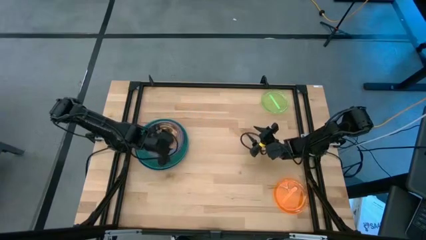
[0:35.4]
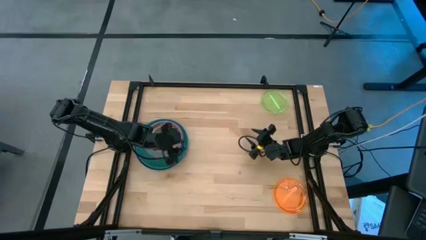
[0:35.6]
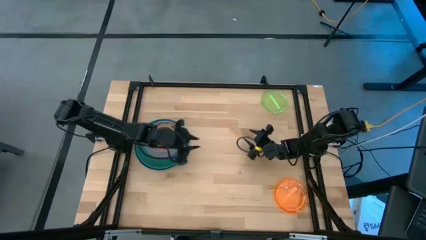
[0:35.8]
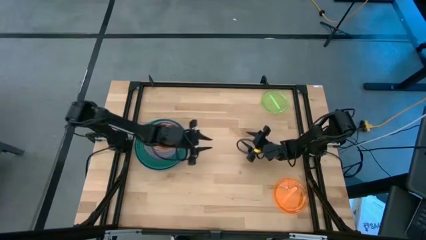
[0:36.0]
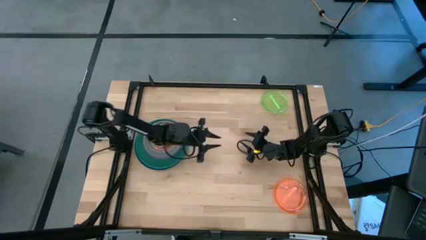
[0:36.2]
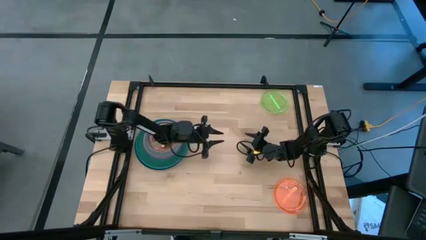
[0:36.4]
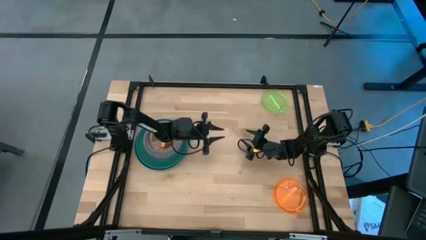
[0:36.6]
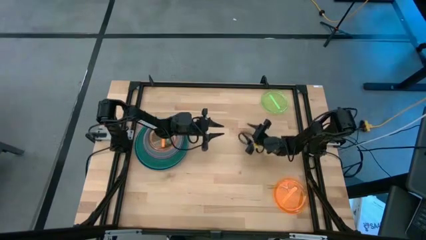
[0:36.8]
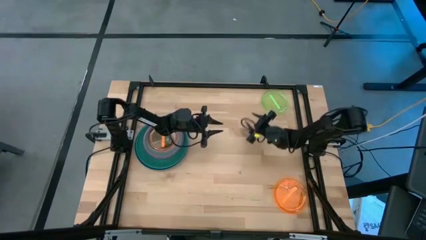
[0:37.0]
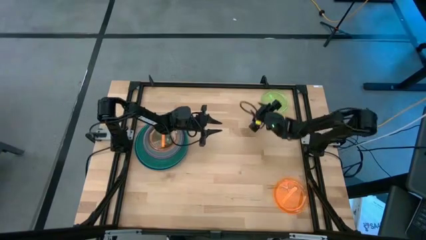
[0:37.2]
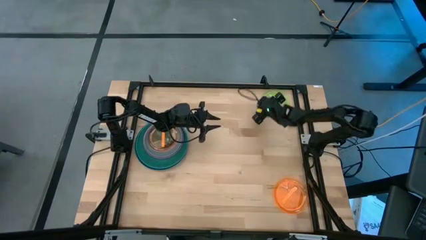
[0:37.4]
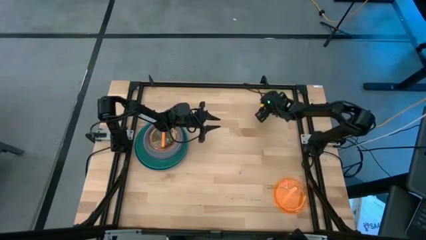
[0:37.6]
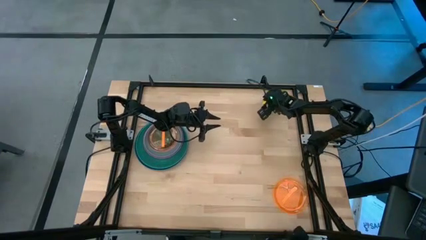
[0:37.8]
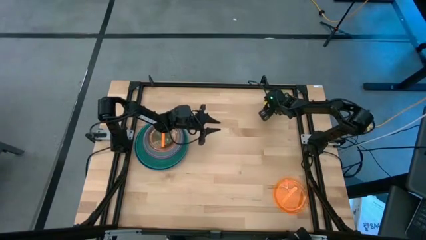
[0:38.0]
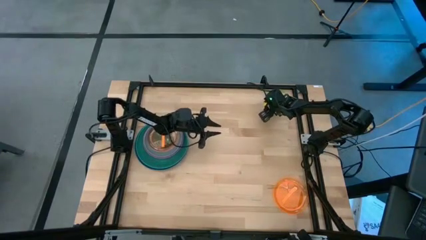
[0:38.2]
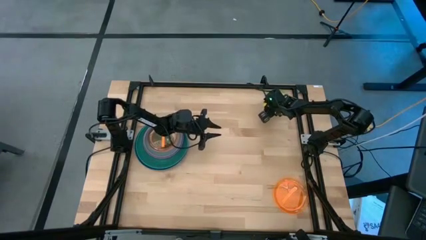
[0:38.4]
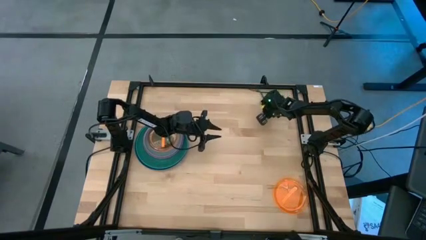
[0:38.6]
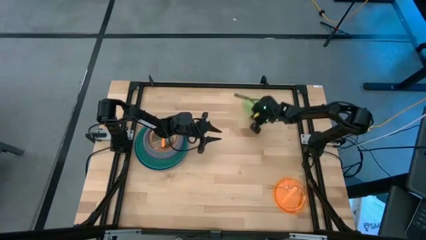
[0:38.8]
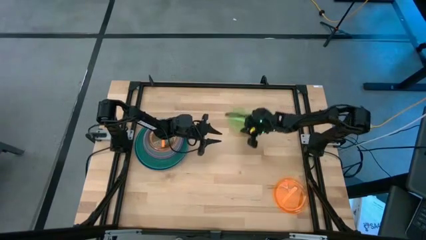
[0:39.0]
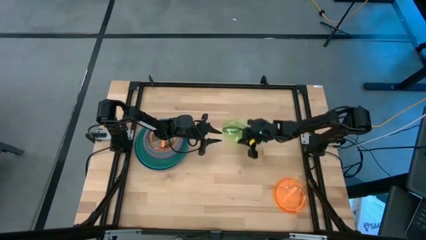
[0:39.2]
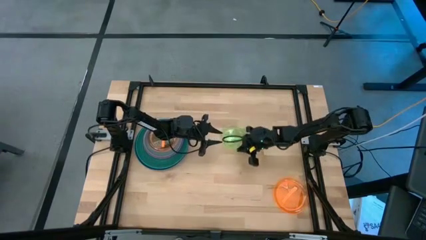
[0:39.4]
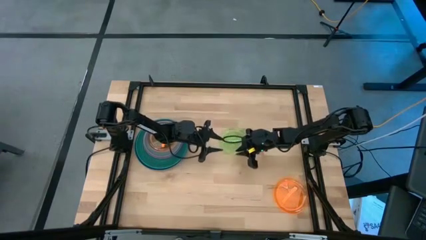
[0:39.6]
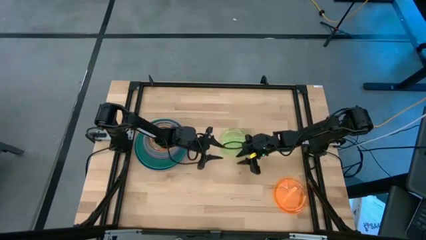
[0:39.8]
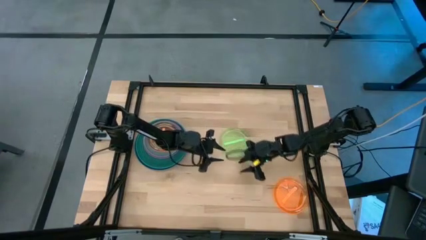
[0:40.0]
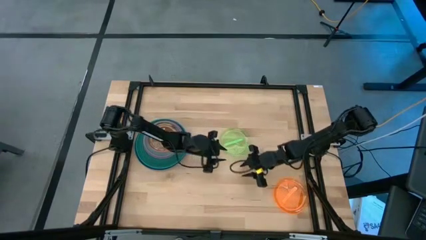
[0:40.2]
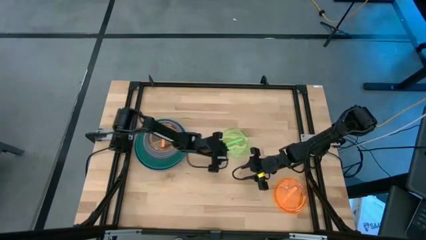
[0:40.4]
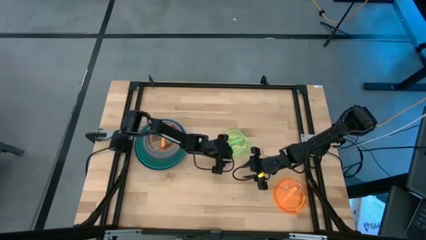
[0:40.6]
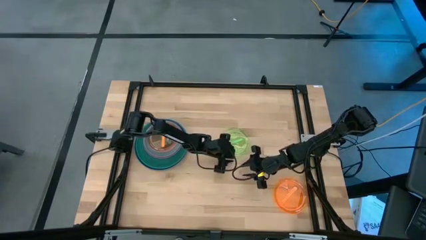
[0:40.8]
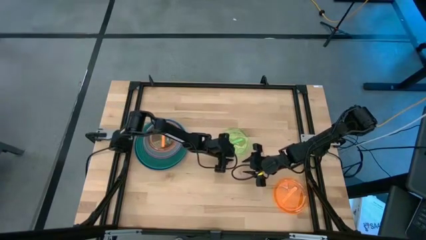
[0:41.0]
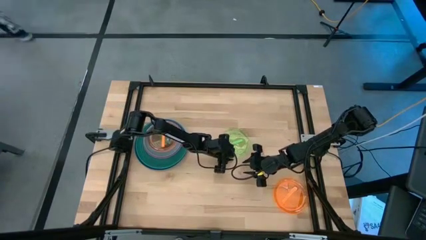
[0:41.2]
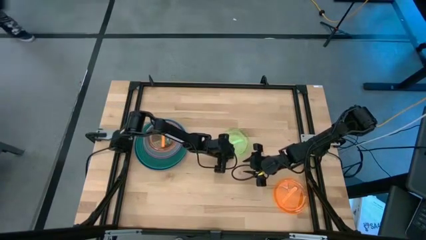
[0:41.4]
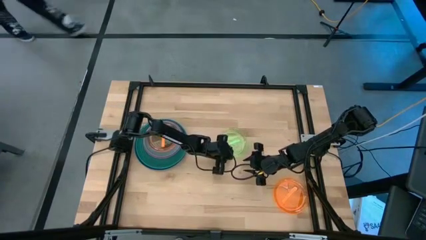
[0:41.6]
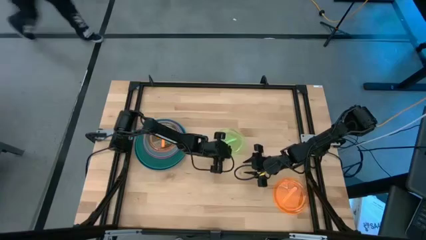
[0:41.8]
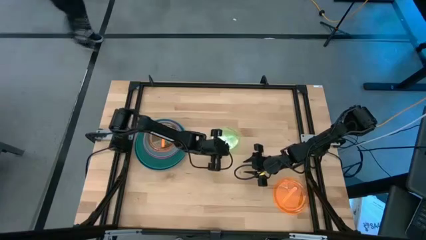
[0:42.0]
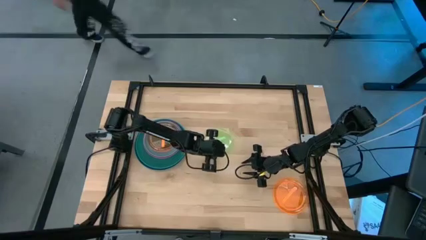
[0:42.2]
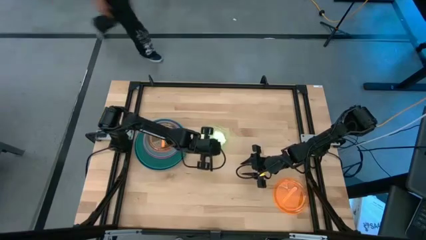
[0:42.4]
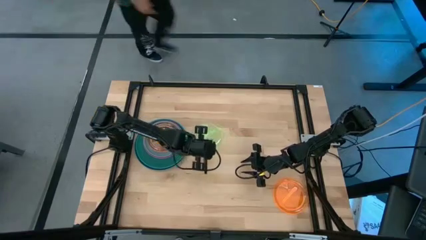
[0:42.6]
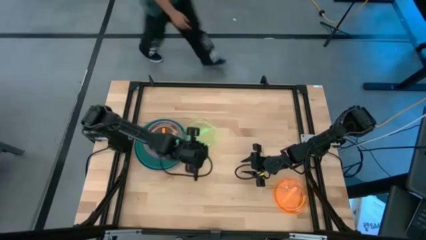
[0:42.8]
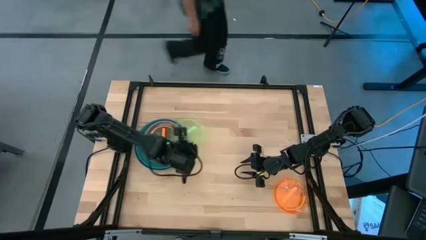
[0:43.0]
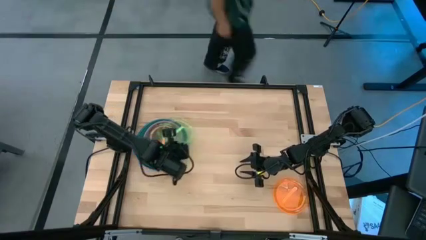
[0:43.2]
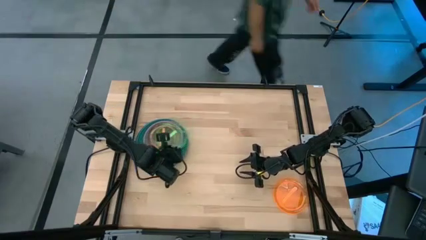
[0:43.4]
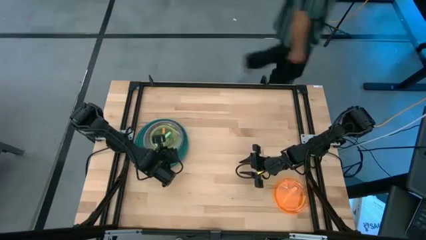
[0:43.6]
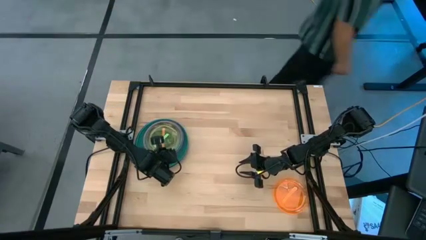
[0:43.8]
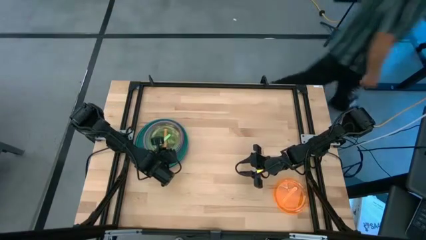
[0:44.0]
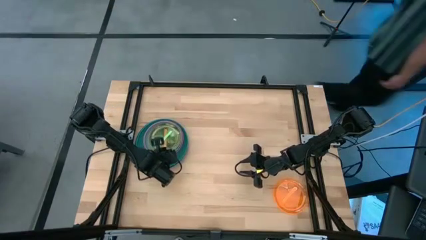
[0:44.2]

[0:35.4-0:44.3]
Task: Stack plastic plates
Stack the green plate on top of the orange plate

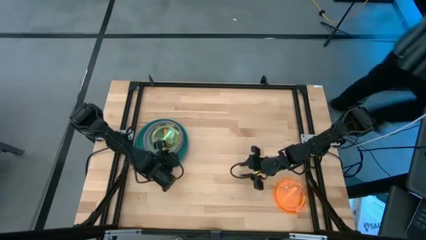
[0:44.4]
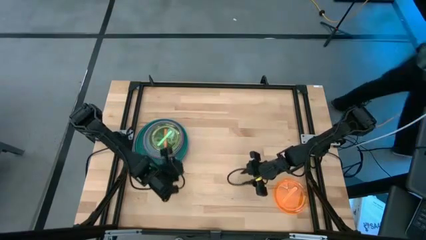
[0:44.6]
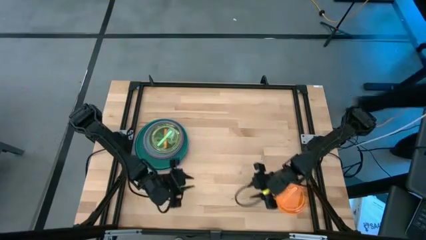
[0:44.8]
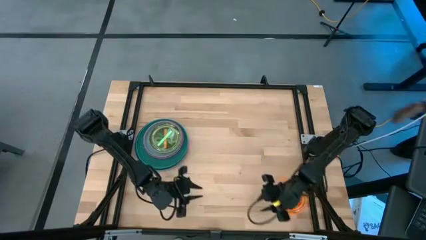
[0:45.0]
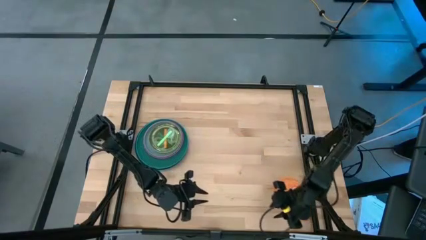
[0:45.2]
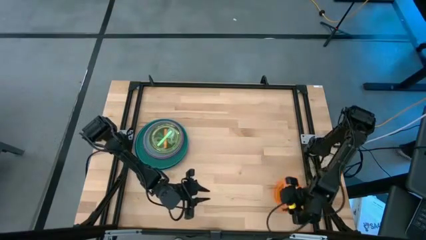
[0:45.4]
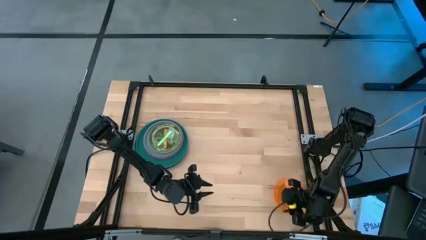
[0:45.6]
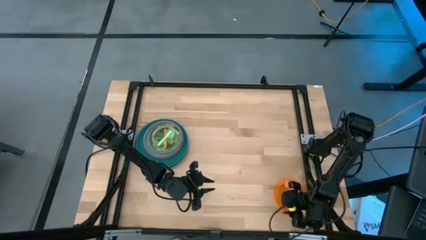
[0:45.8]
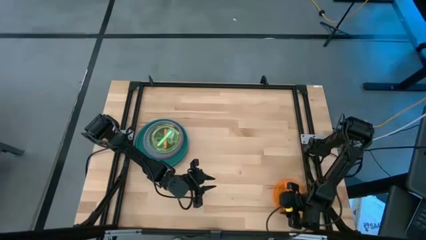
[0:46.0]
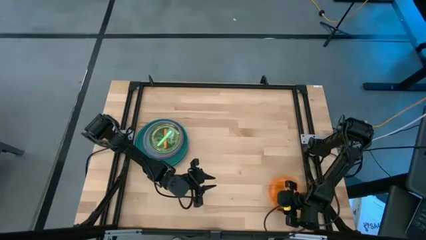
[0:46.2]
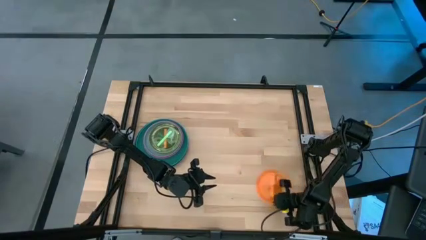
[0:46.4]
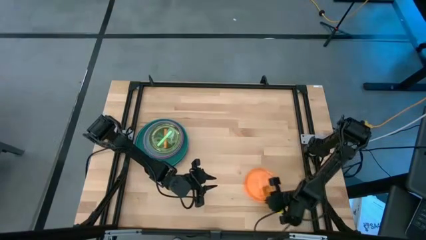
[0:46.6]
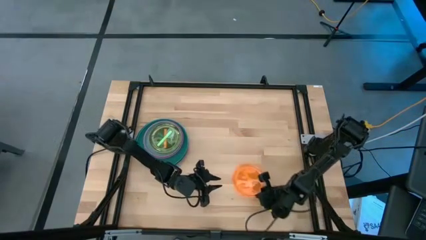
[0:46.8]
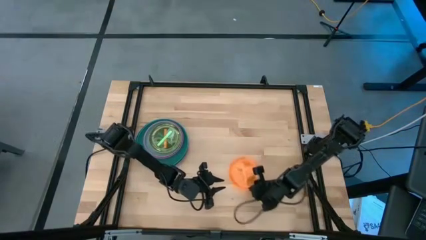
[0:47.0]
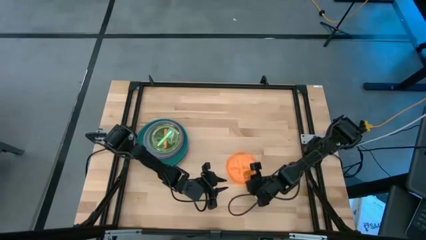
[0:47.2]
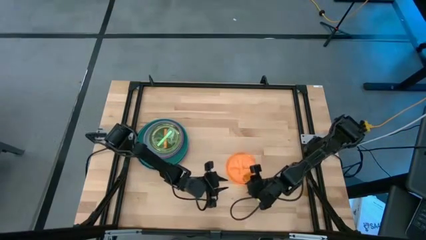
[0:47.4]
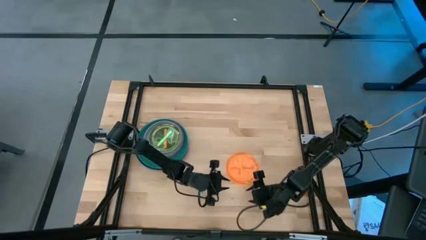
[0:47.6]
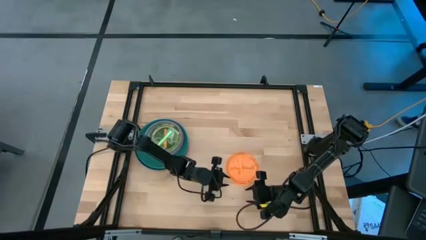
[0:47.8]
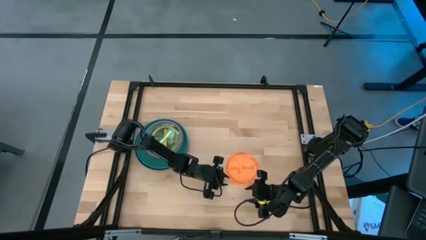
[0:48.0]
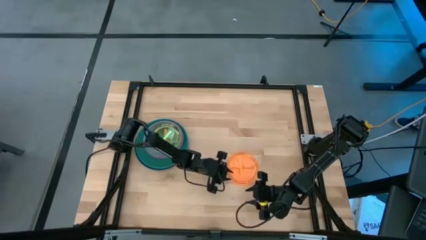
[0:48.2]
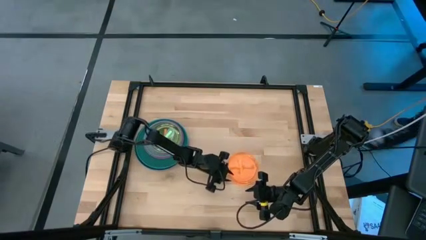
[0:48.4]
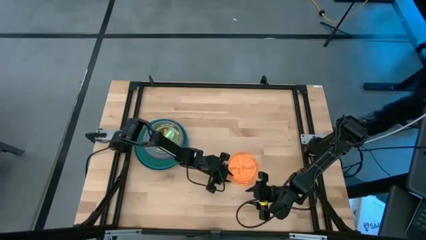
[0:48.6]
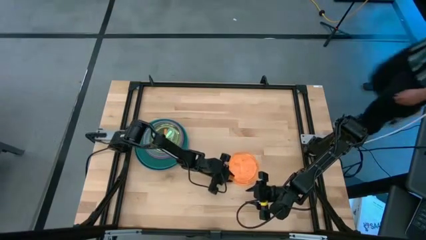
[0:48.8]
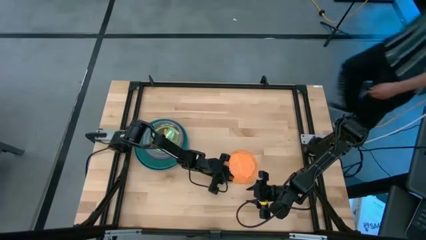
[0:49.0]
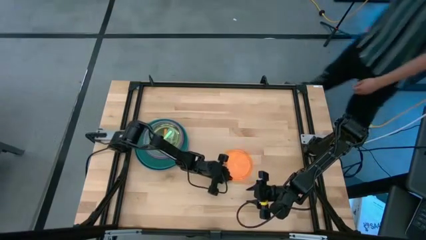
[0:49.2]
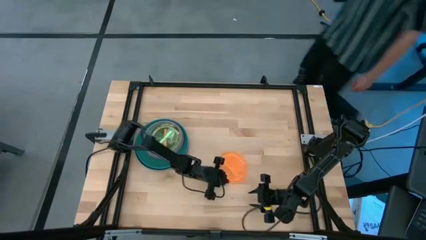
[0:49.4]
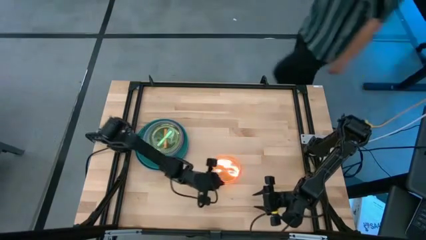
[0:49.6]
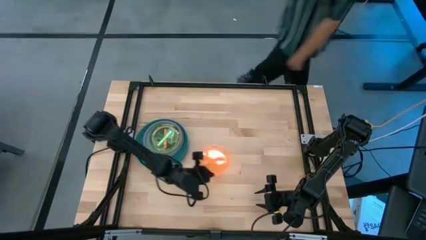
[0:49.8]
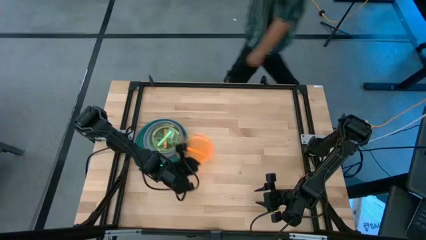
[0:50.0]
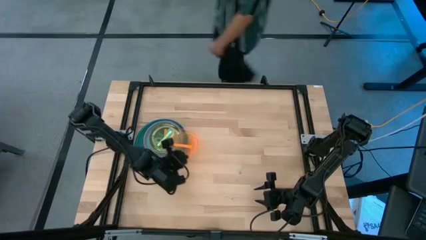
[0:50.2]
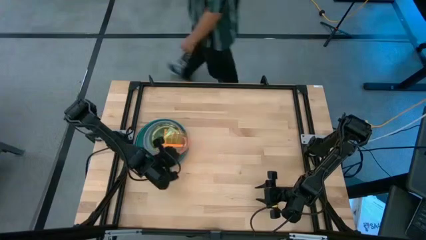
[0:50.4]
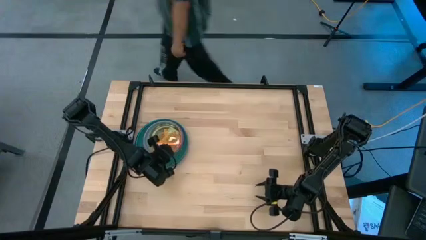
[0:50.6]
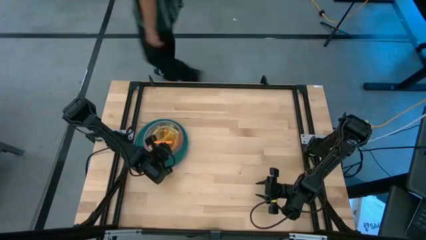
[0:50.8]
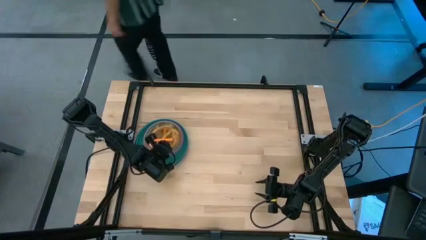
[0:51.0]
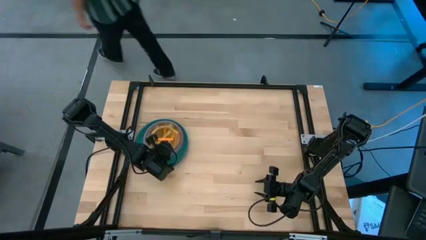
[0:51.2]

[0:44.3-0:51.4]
Stack the orange plate on top of the green plate

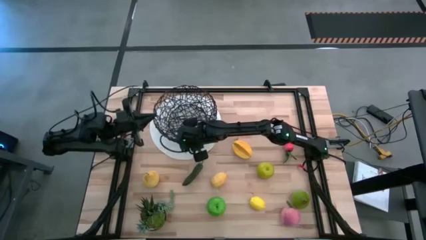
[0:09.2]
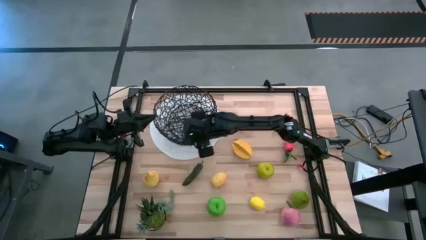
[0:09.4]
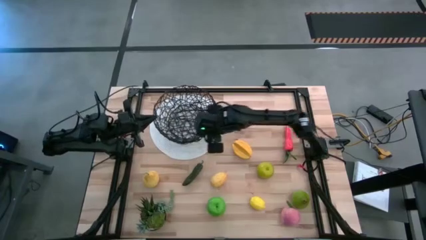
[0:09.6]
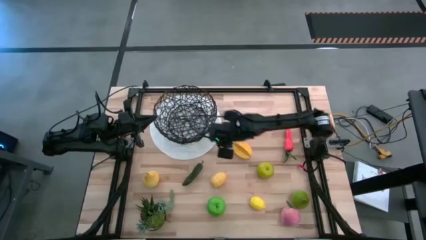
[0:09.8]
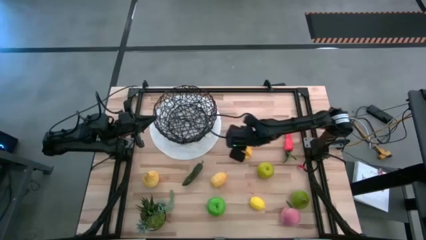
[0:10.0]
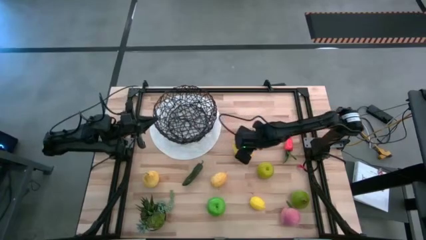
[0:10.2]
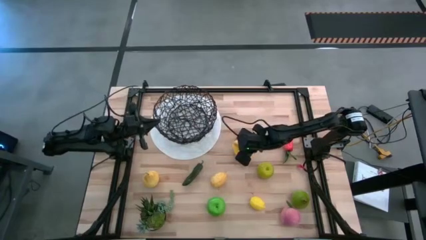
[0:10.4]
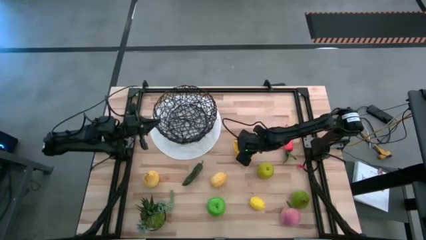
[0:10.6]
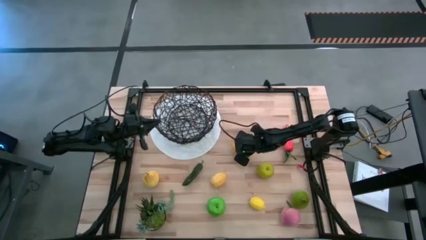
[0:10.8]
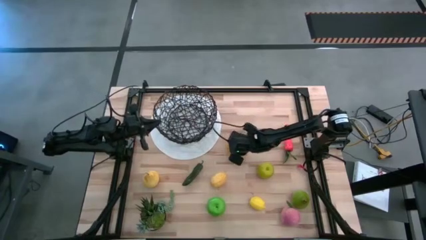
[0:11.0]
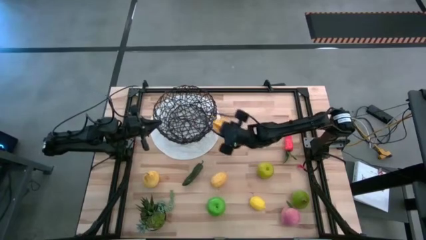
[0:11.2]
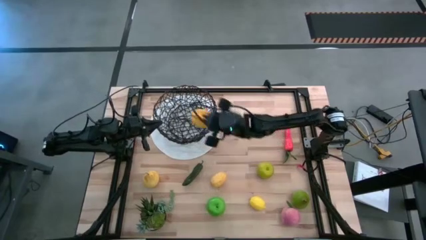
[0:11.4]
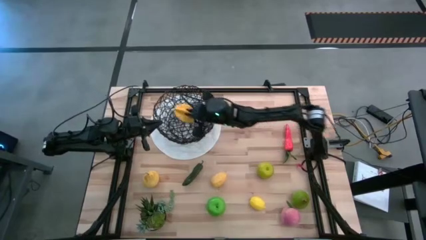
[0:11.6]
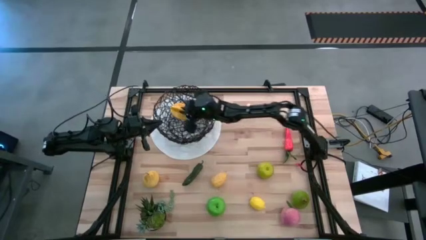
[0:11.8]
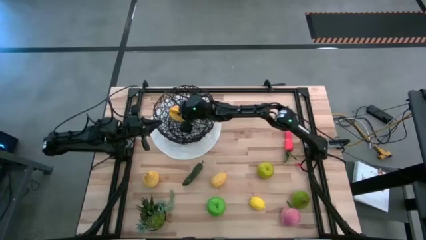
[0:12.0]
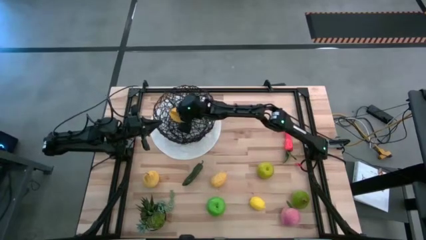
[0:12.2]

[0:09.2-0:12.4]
Task: Build produce basket
Put the star fruit into the wire basket
